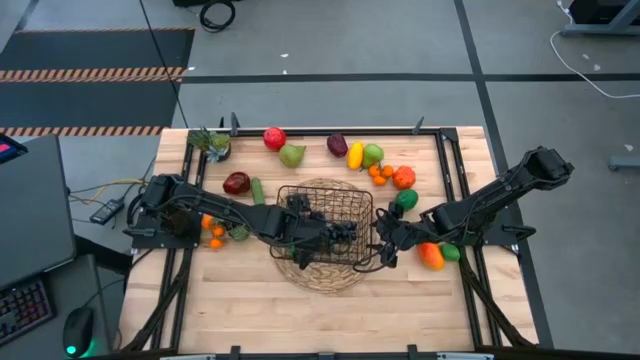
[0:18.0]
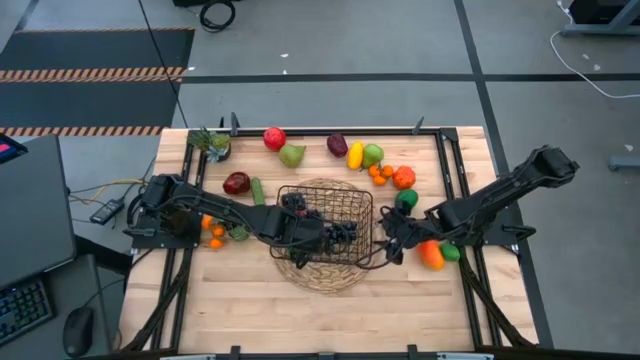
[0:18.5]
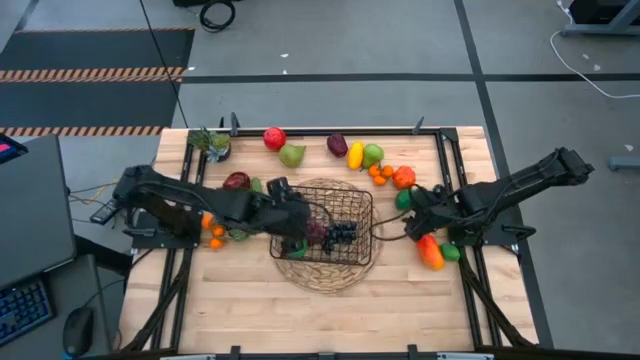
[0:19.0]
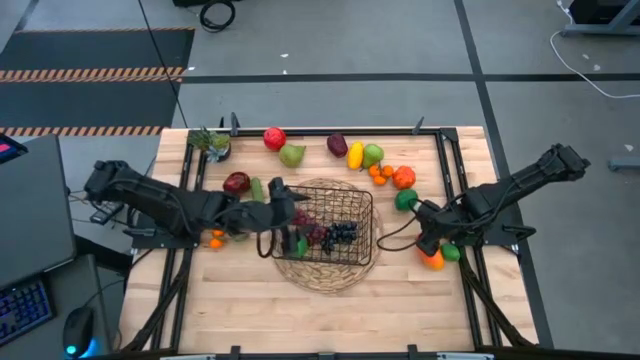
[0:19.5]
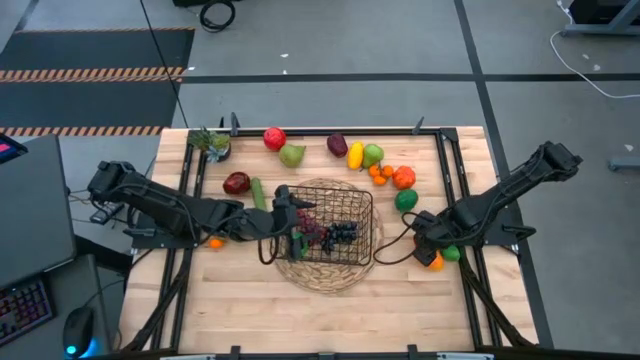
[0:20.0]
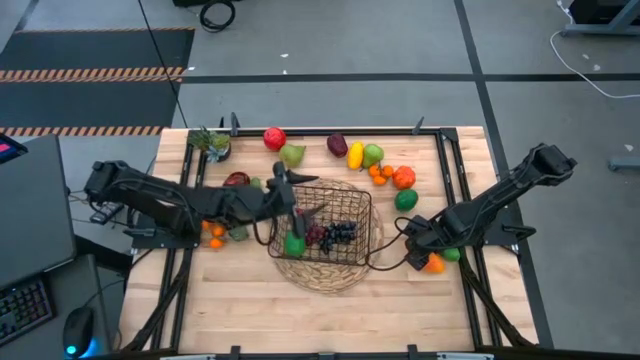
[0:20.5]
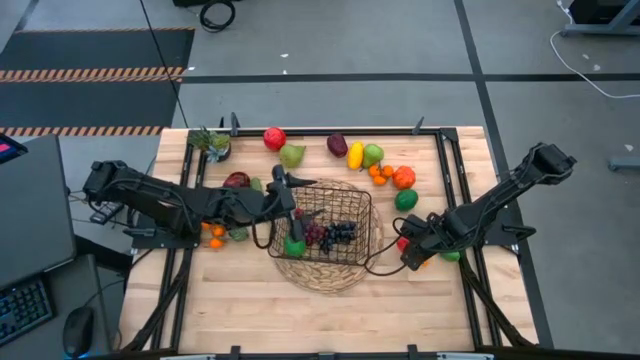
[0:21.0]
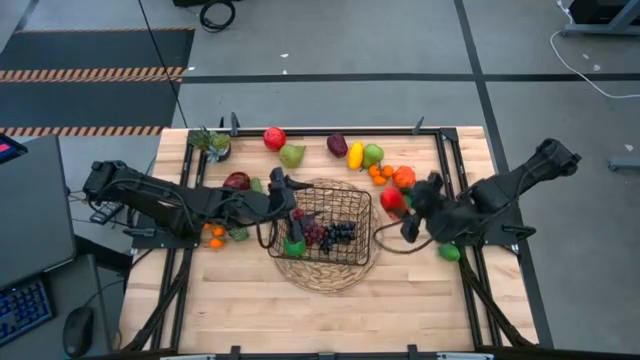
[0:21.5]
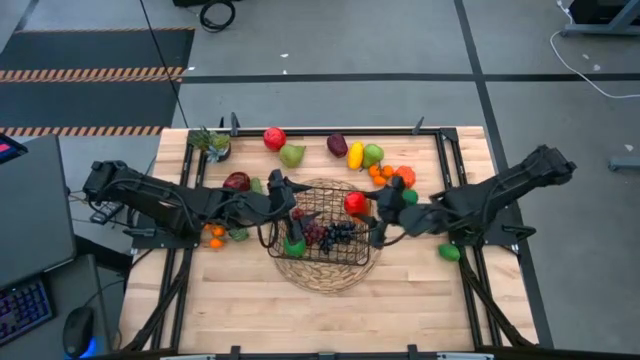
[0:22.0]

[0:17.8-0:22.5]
Task: Build produce basket
Put the yellow red mango into the black wire basket

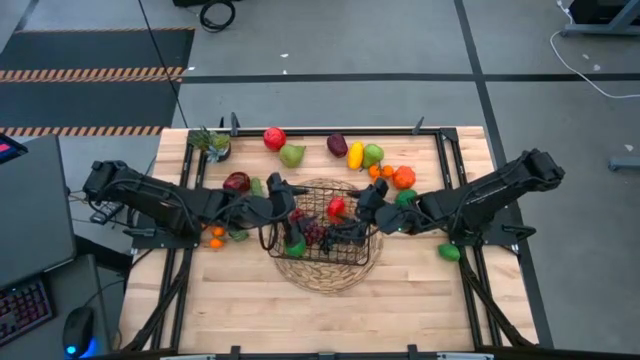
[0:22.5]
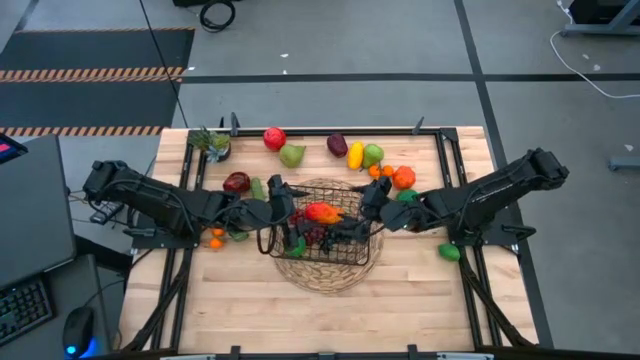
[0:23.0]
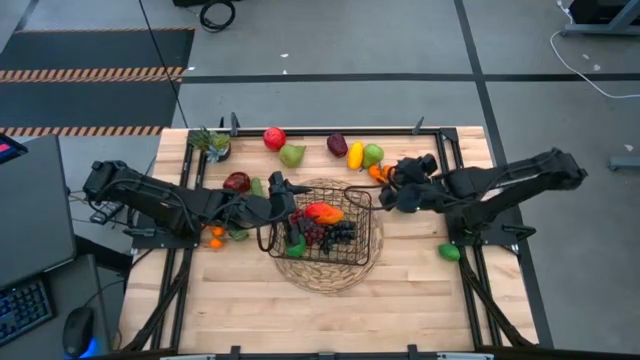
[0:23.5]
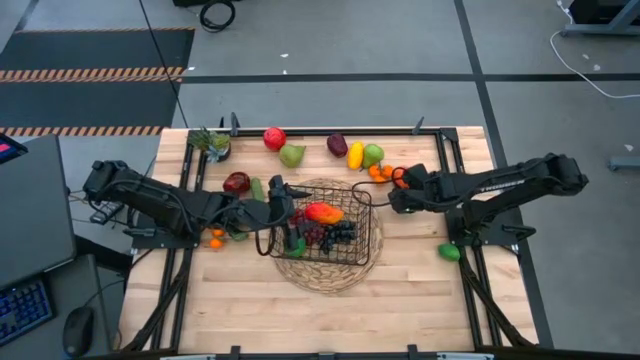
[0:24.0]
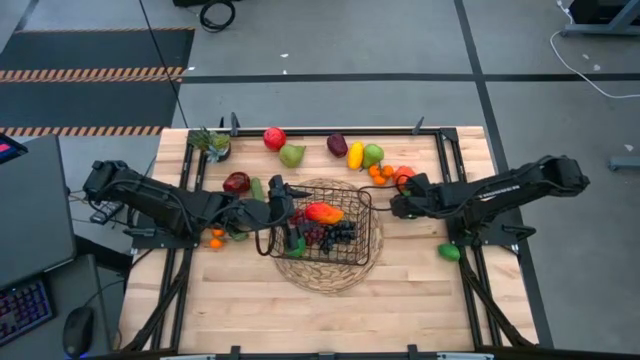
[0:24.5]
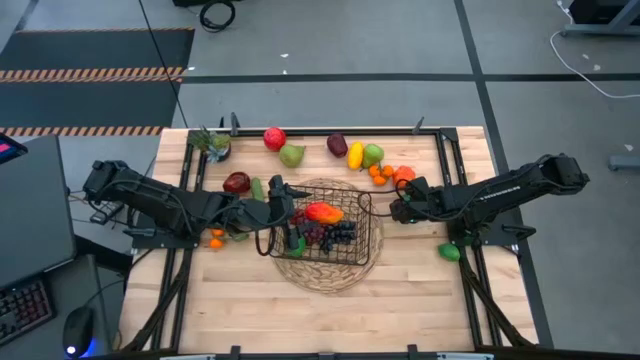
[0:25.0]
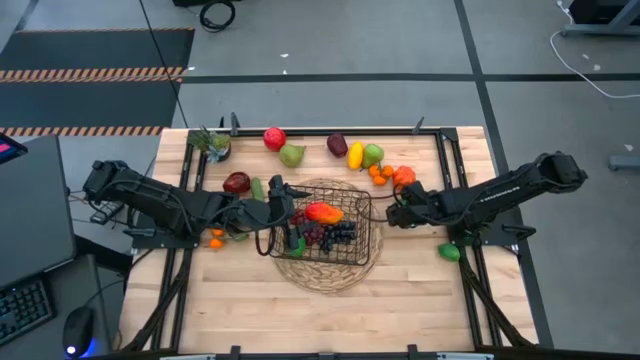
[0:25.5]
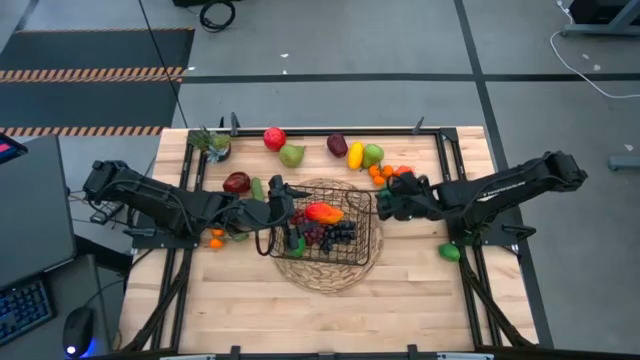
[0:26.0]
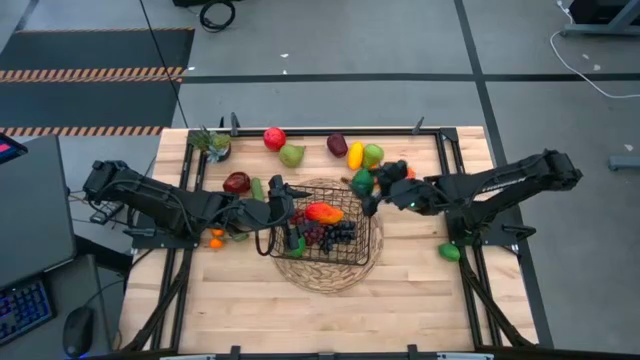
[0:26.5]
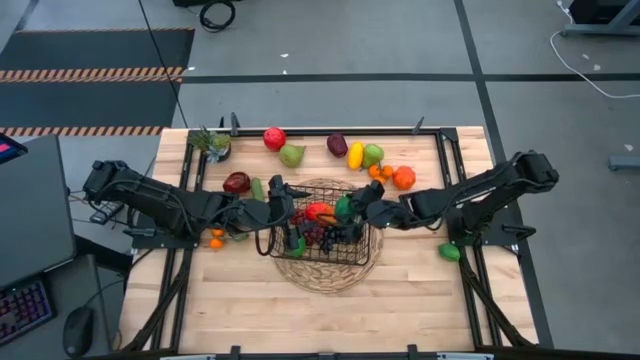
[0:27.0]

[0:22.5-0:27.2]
Put the top green lime into the black wire basket

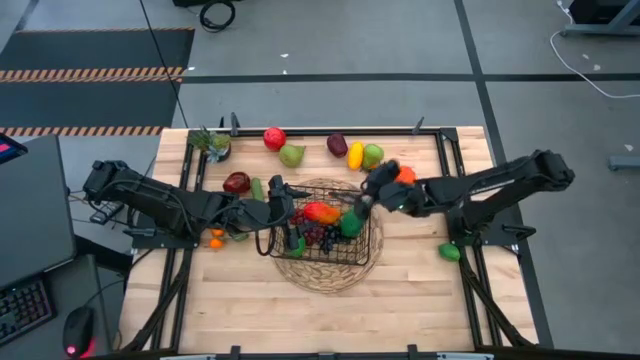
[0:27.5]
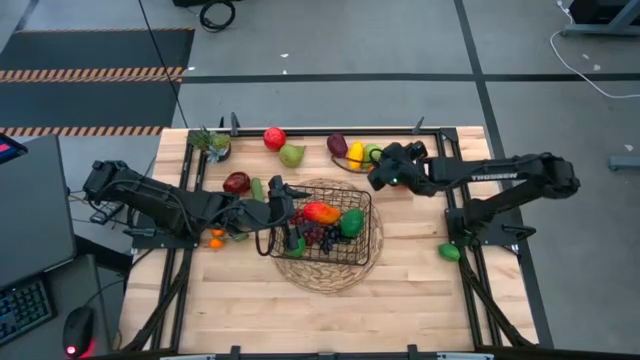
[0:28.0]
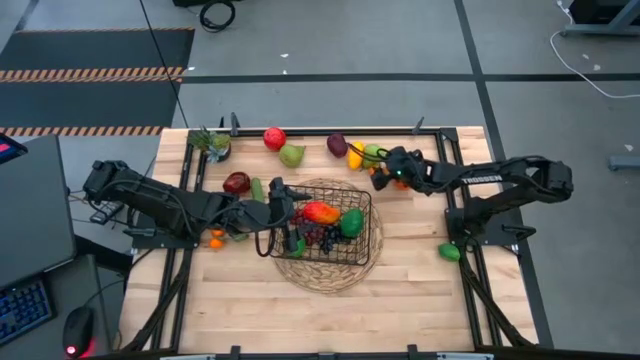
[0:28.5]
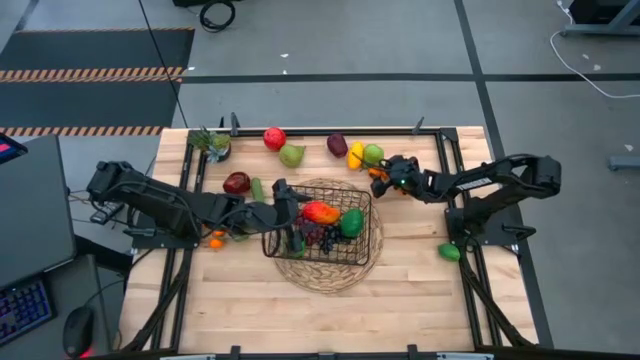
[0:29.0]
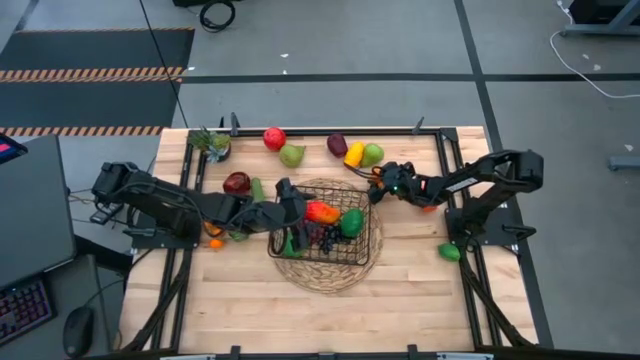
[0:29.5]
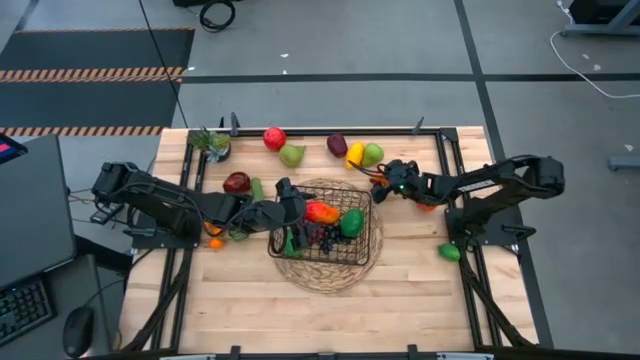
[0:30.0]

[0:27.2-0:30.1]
Put the top tangerines into the black wire basket

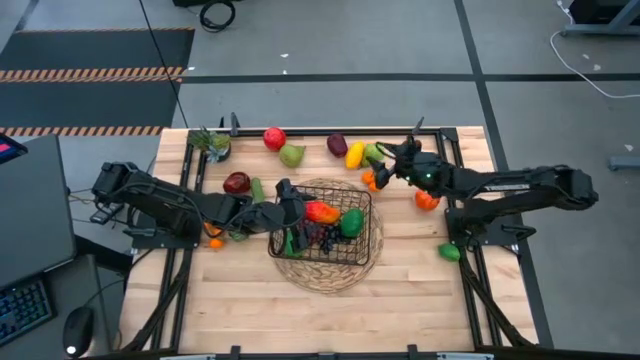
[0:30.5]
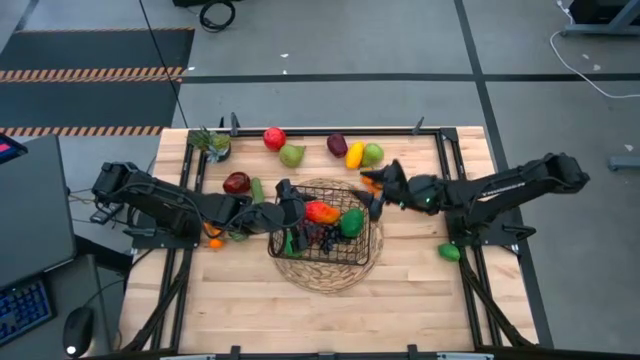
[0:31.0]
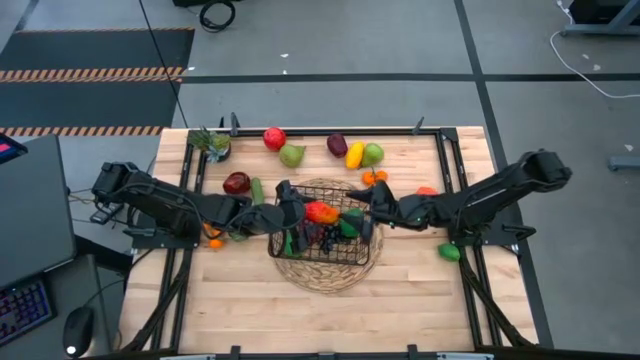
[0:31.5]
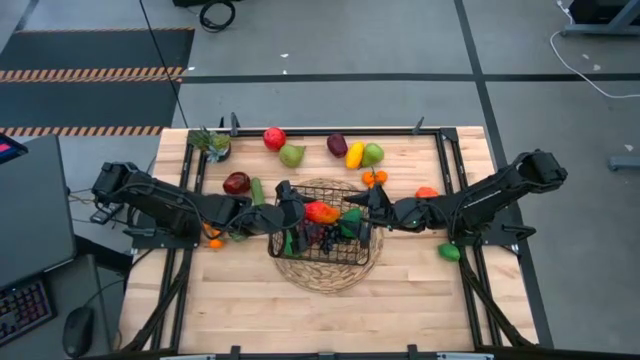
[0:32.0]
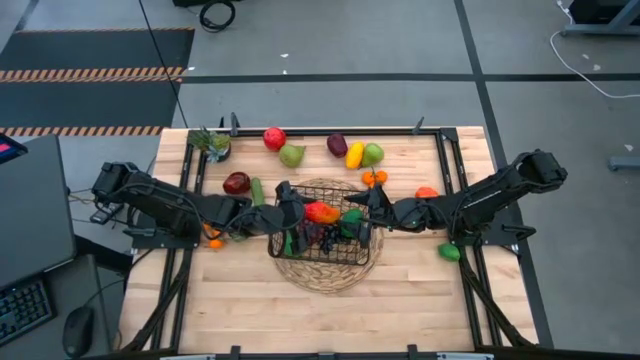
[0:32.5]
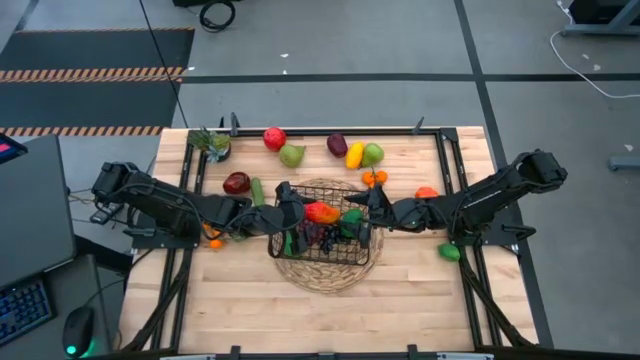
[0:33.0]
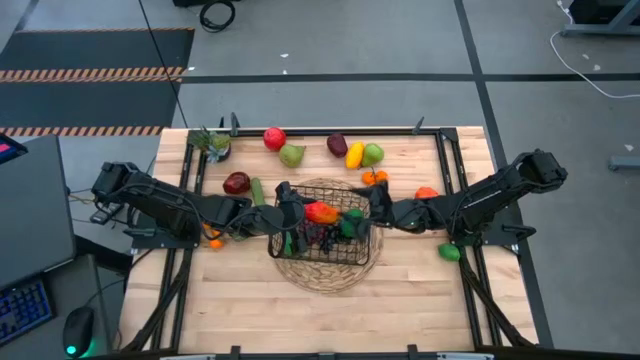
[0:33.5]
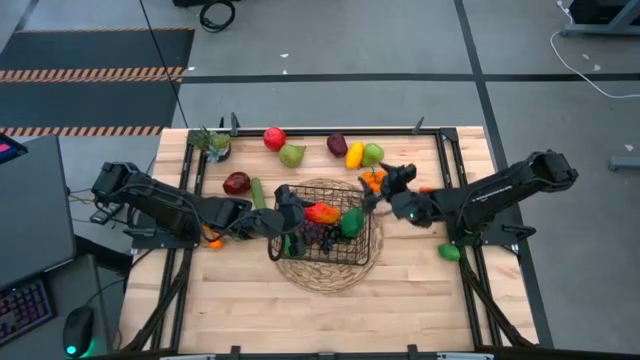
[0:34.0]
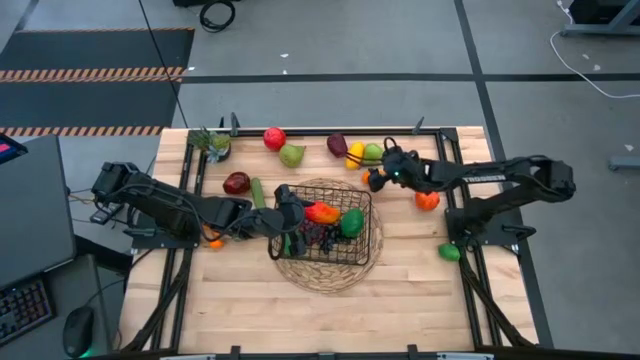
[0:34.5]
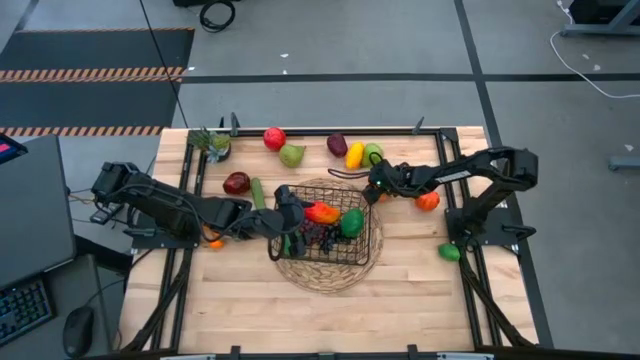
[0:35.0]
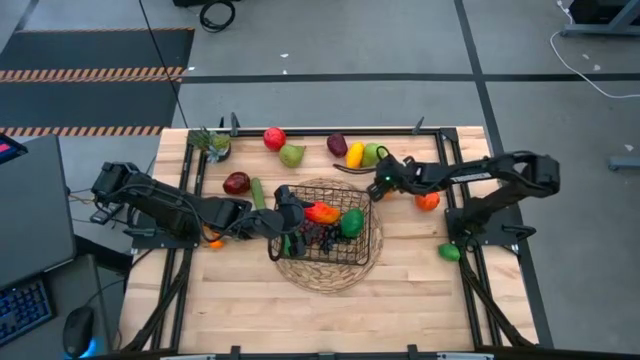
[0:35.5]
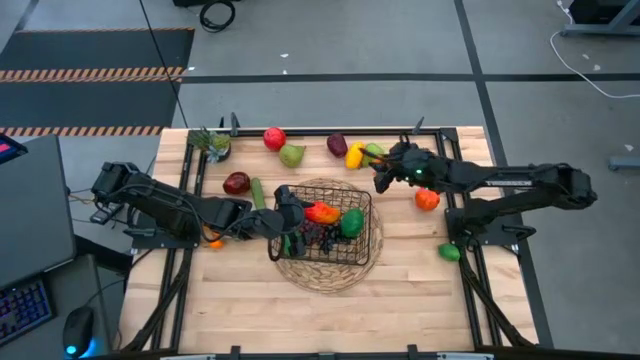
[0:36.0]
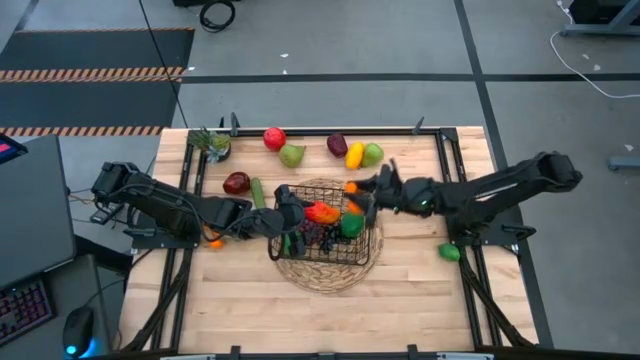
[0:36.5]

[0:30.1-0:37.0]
Put the top tangerines into the black wire basket

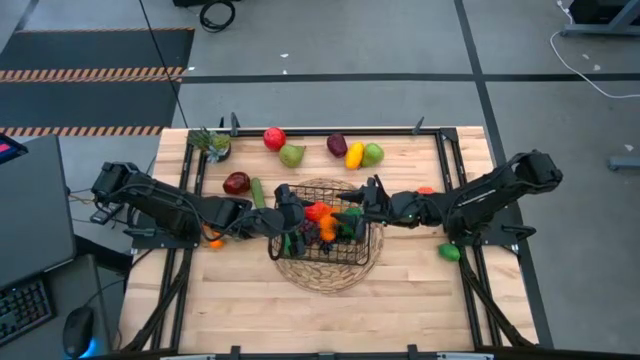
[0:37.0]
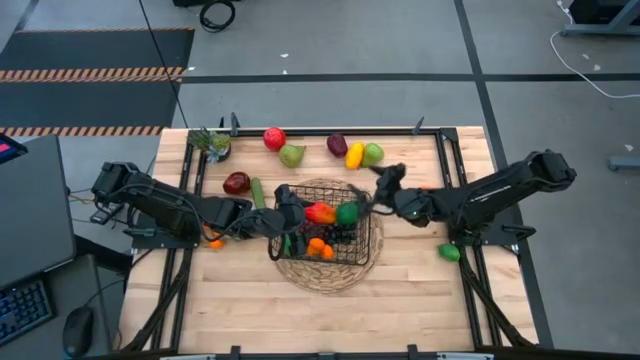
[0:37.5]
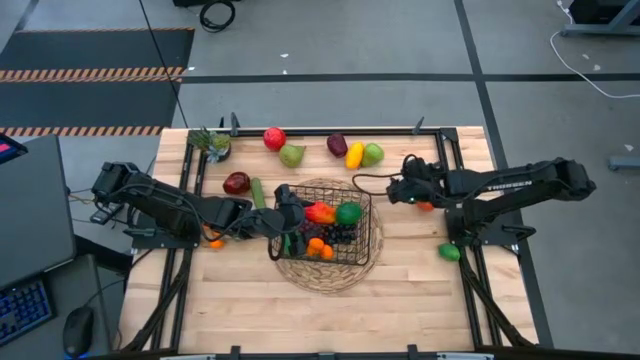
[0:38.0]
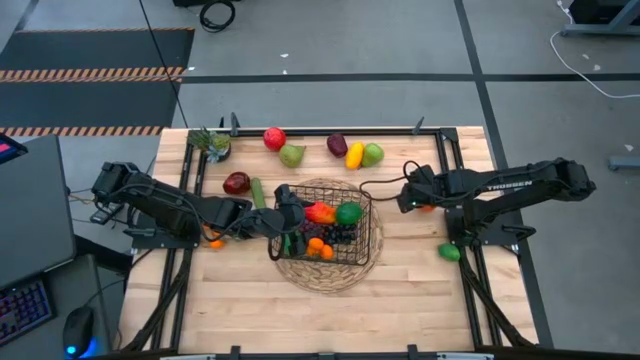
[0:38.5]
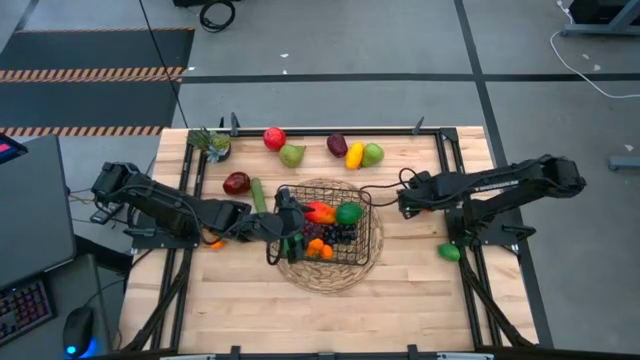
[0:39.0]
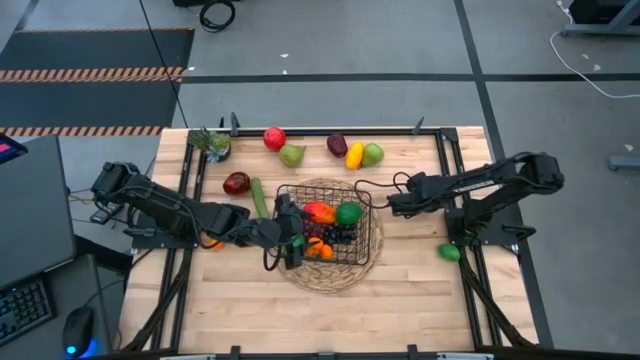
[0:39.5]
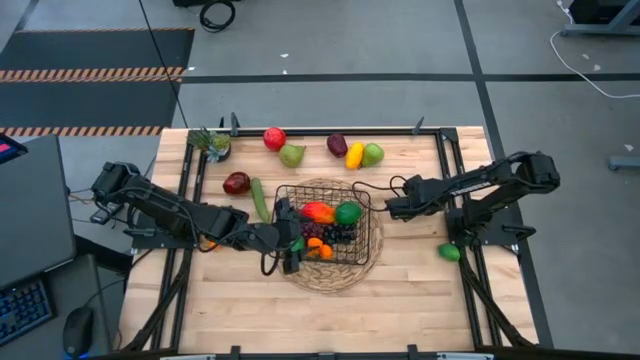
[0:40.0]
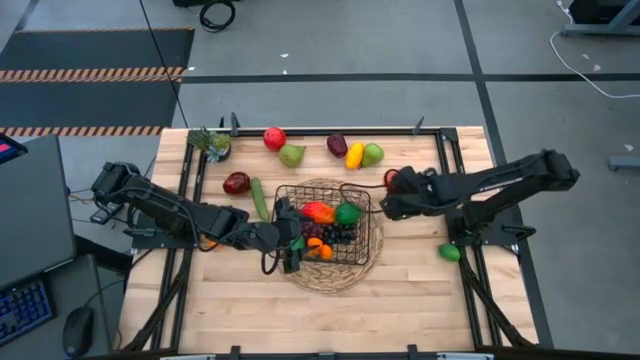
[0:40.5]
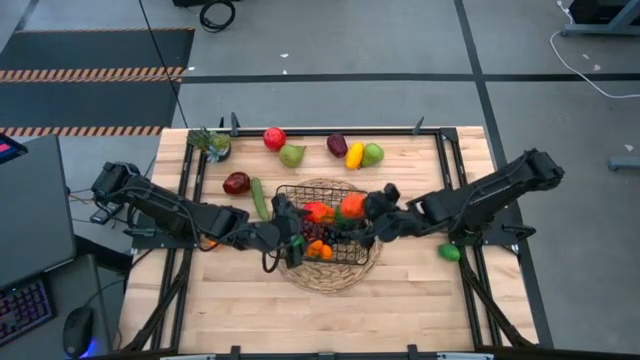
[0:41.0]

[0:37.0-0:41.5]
Put the tangerine into the black wire basket
